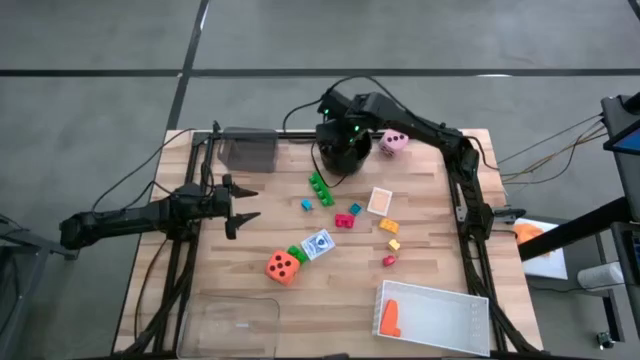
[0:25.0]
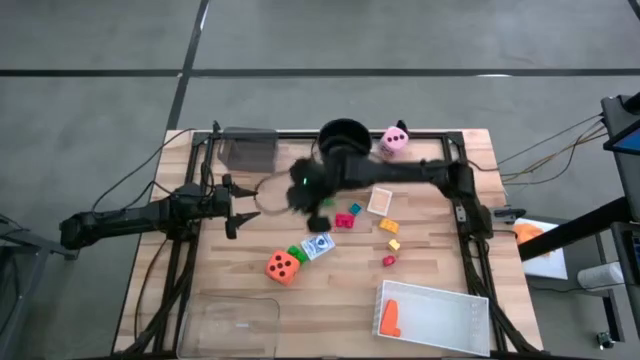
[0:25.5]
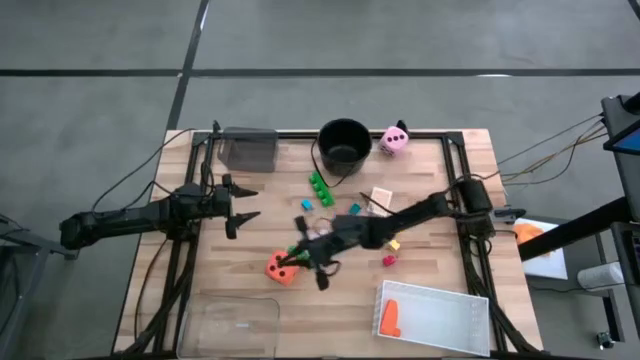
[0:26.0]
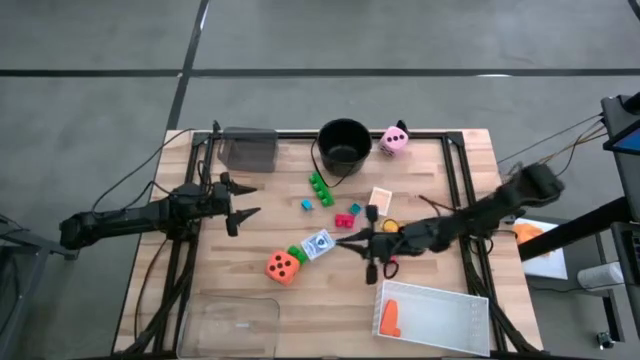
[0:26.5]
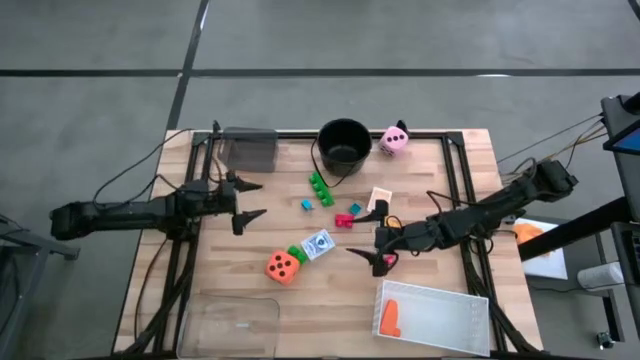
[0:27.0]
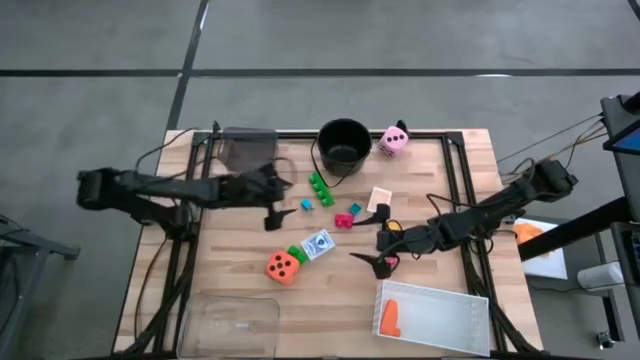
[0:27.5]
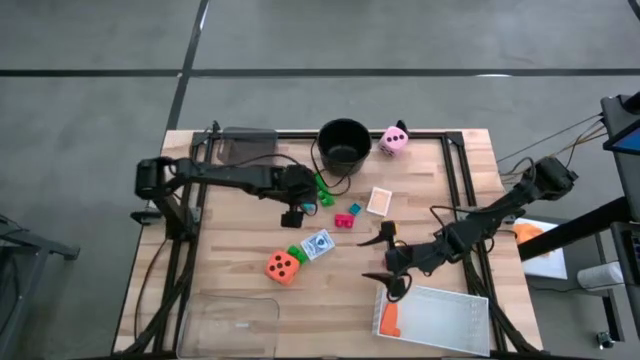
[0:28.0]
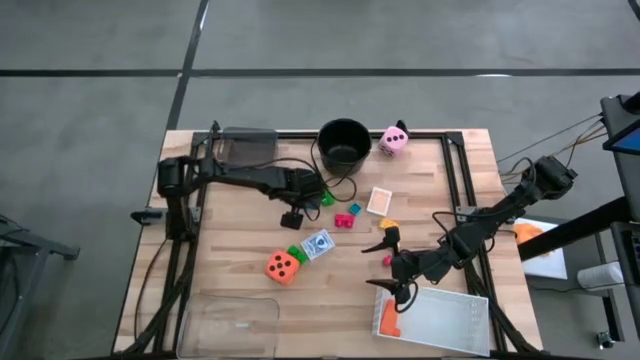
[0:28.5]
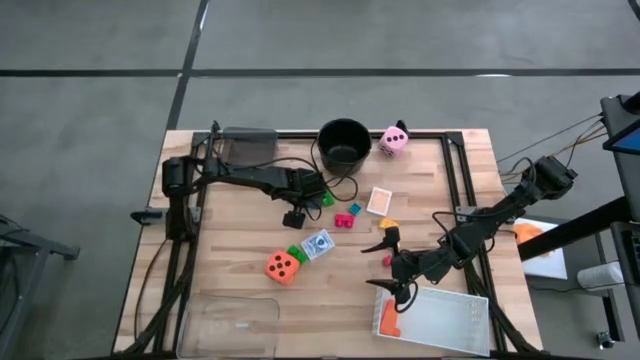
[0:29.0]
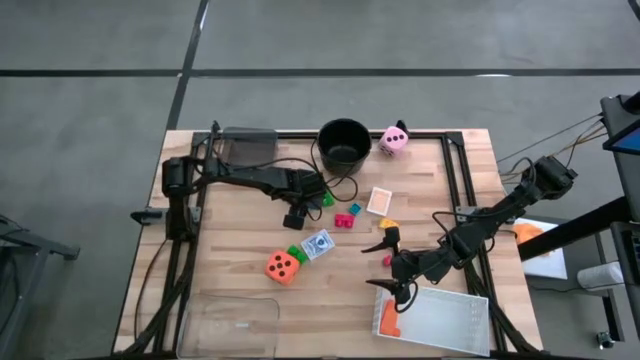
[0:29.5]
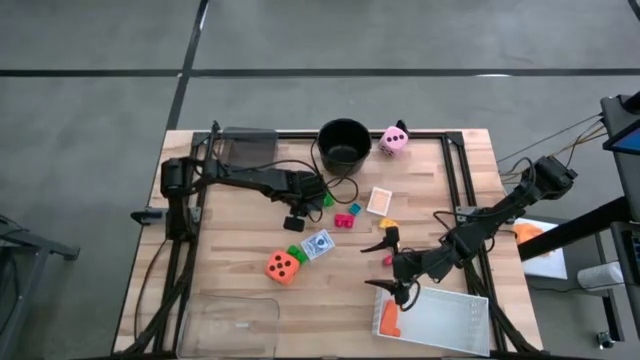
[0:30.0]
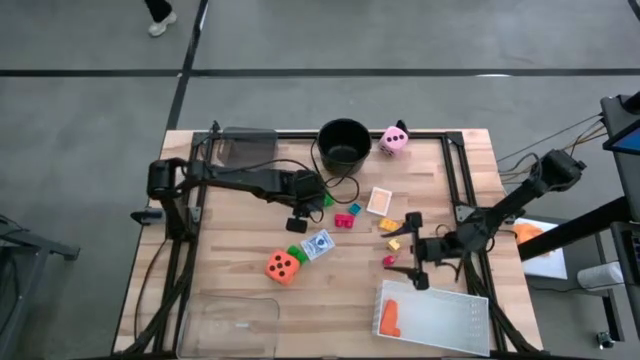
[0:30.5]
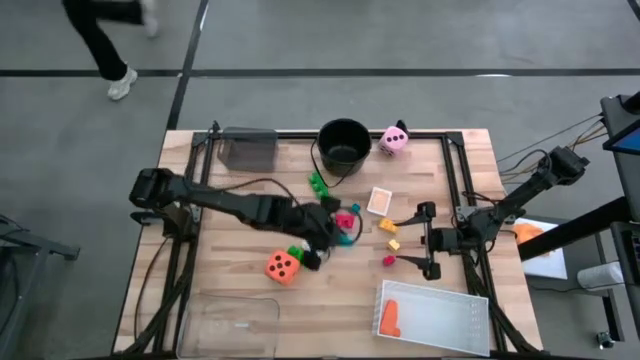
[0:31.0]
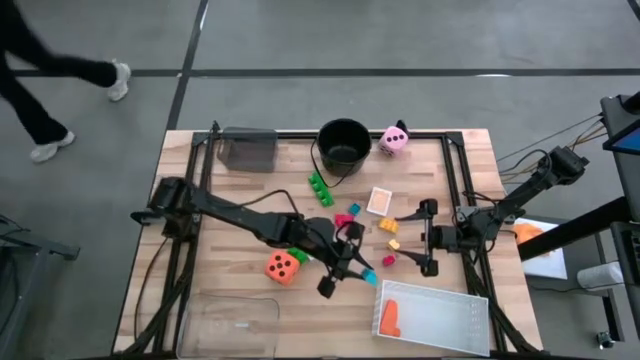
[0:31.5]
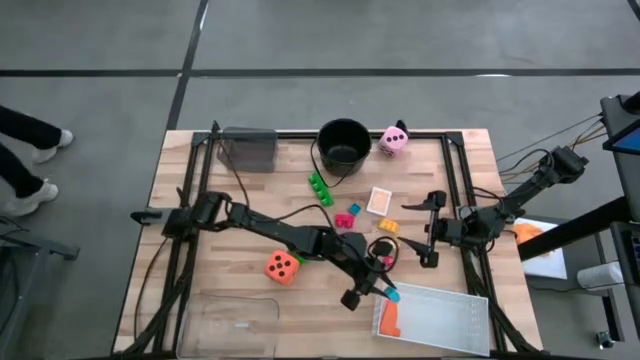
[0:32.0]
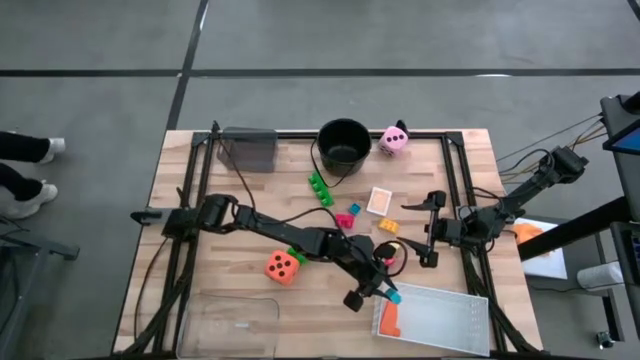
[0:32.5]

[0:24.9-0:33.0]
Task: Pick & Place Toys
Put the left blue game piece into the white bin

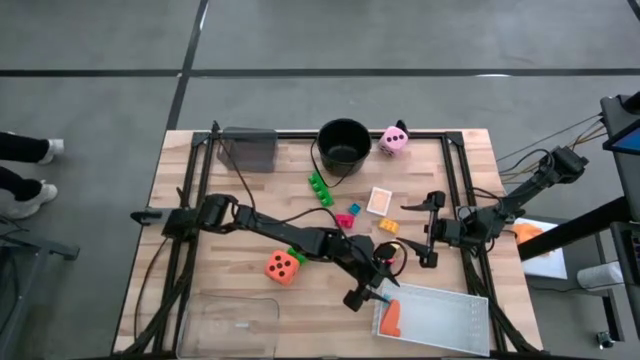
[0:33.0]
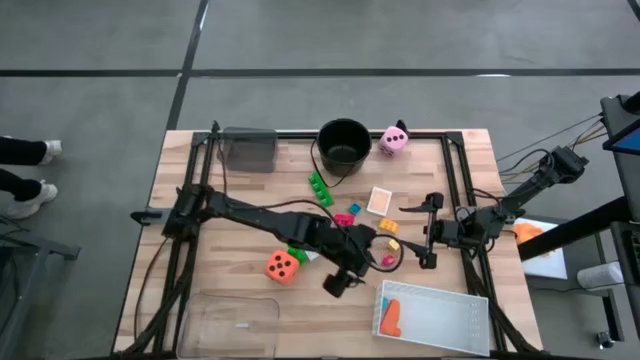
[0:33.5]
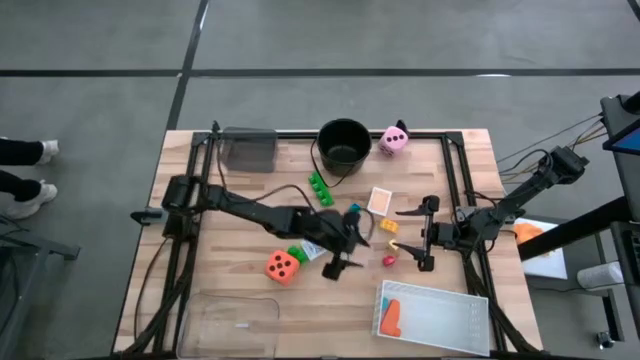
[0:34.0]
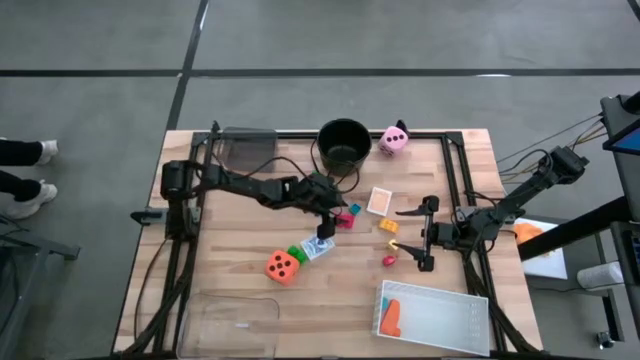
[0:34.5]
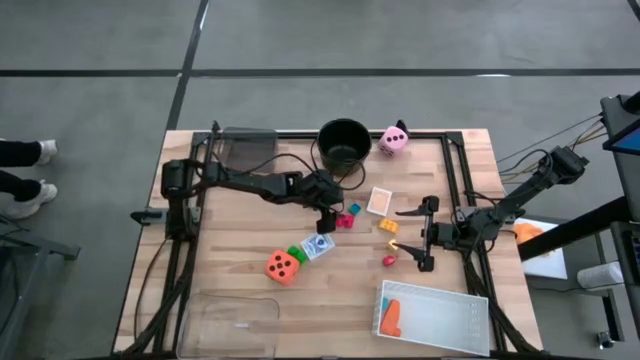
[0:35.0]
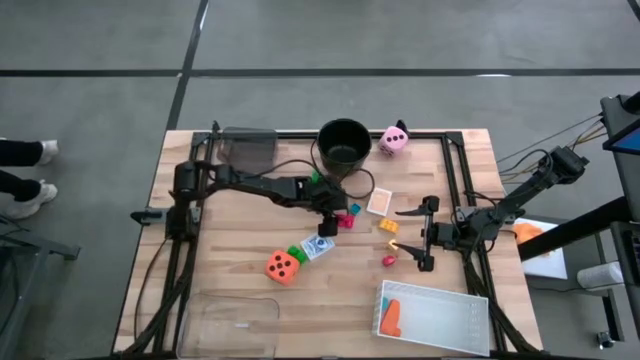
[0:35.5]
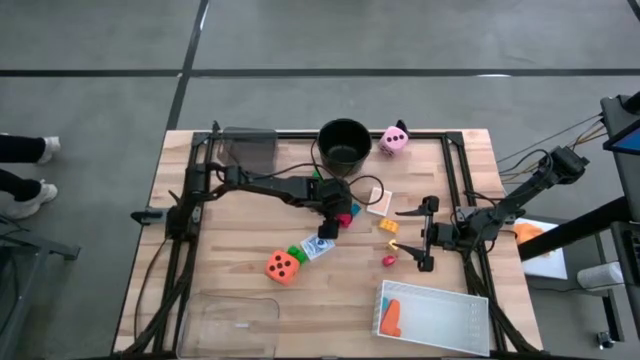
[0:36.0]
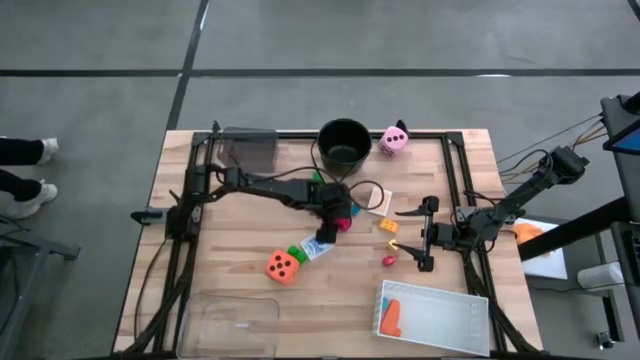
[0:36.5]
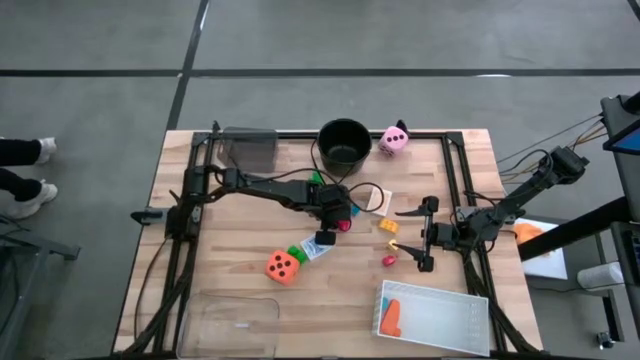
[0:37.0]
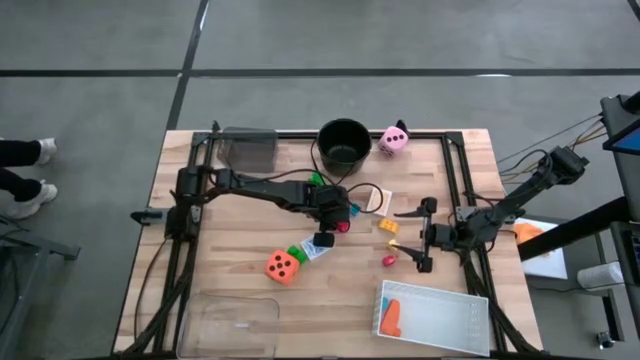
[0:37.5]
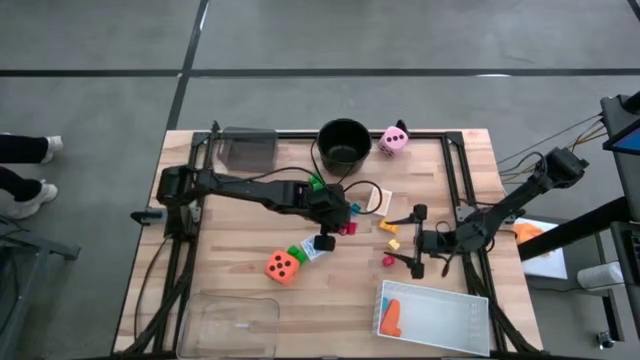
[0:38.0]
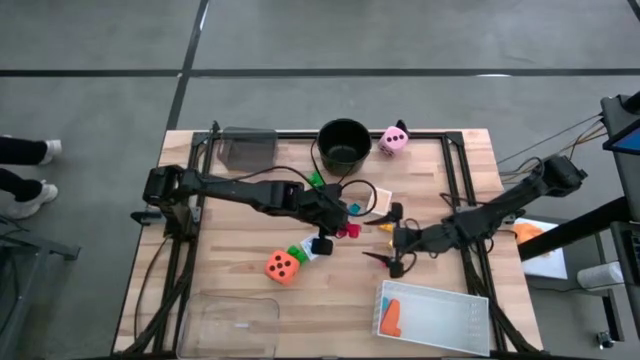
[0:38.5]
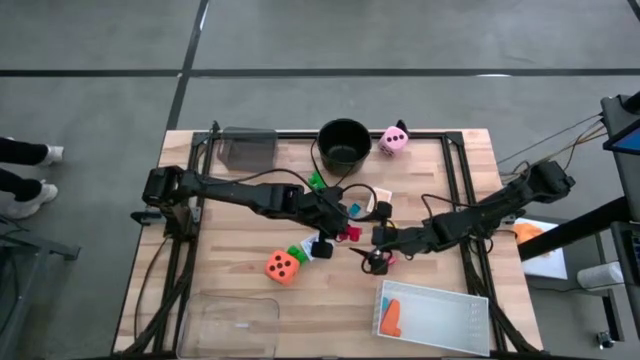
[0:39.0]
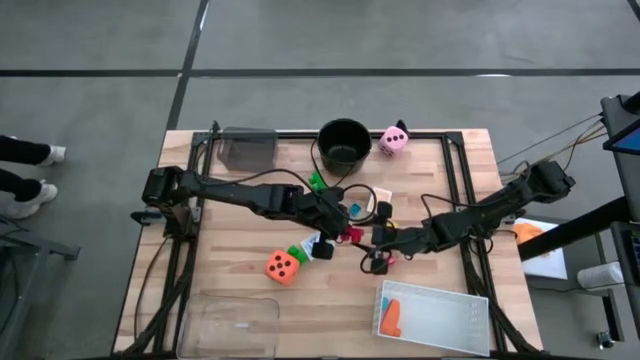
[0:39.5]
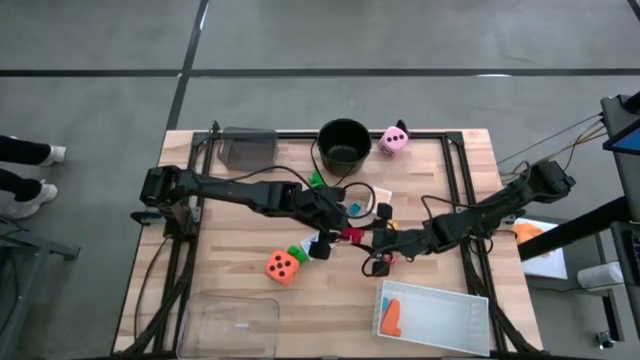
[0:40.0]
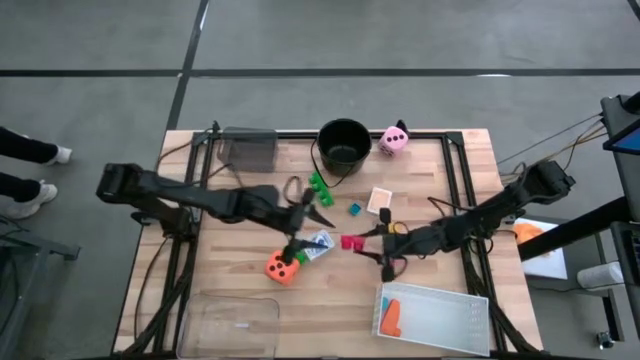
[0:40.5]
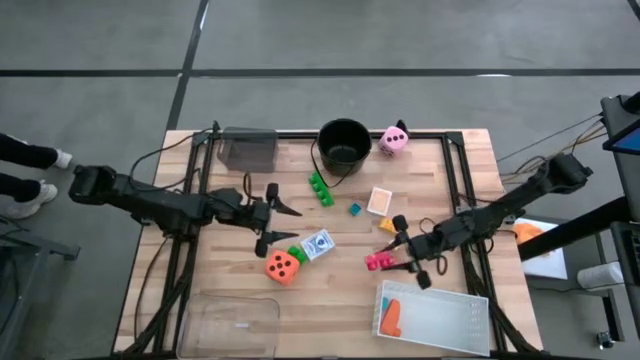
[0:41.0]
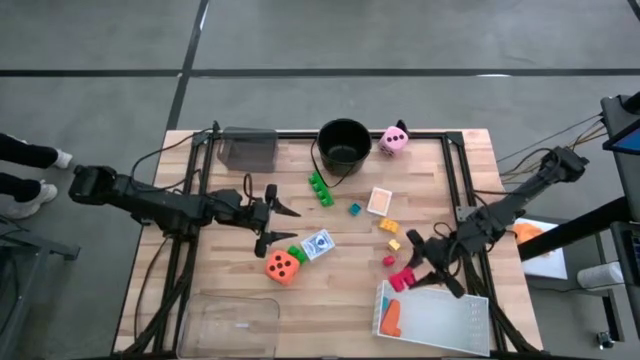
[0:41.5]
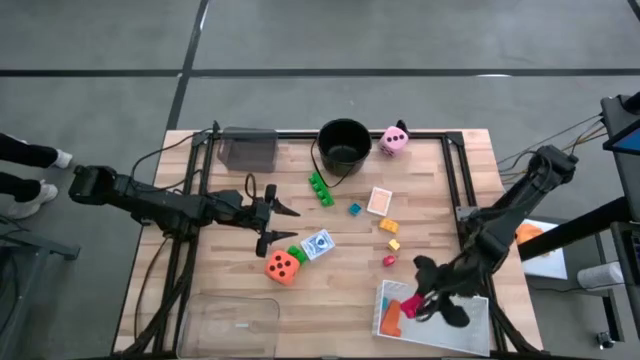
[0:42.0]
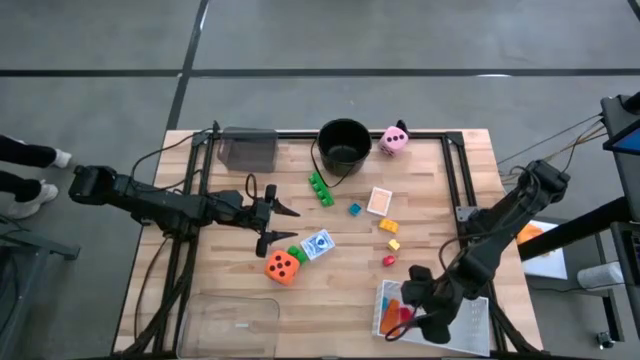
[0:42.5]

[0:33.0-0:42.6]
Put the top red game piece into the white bin

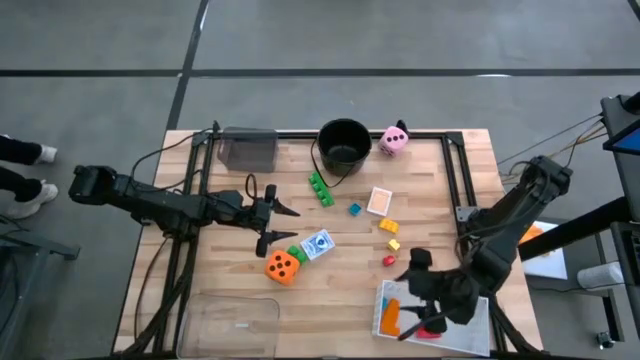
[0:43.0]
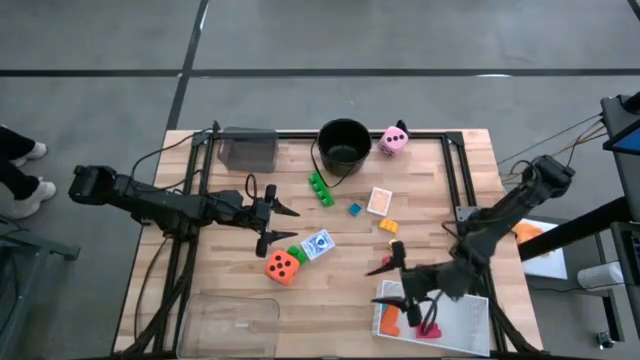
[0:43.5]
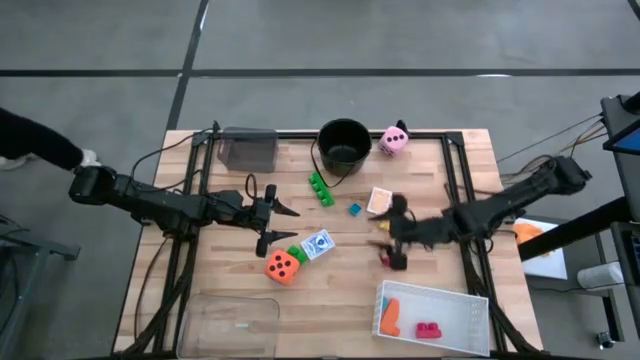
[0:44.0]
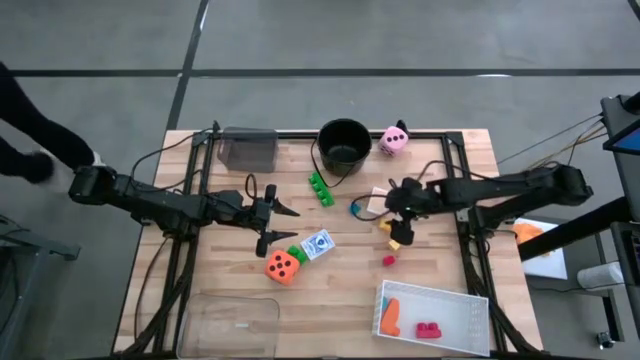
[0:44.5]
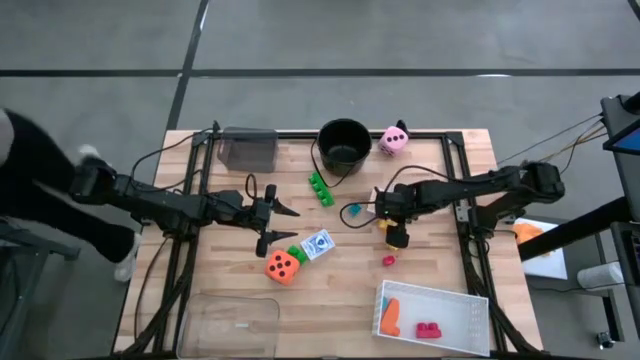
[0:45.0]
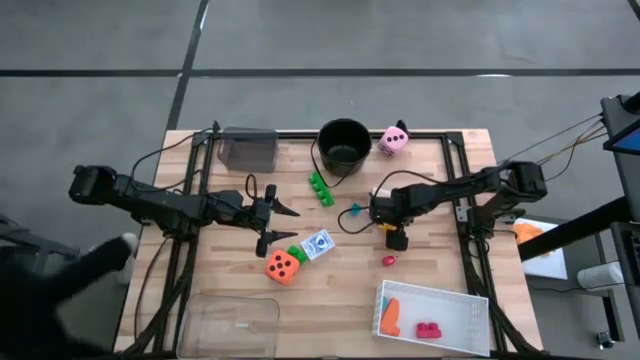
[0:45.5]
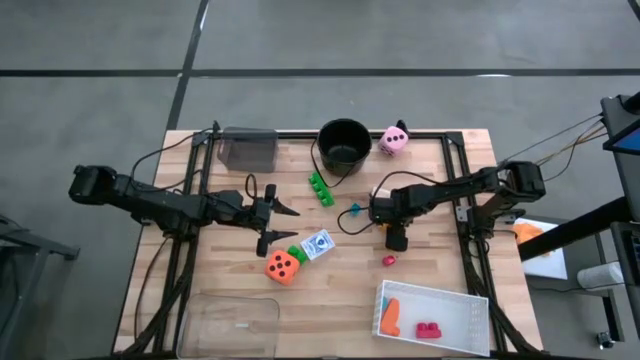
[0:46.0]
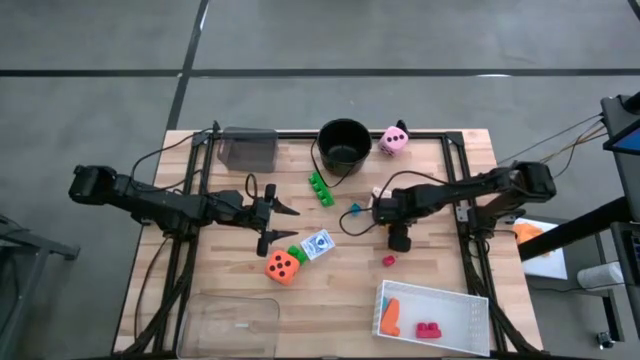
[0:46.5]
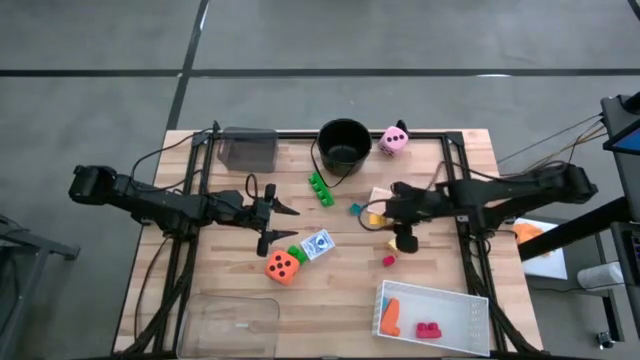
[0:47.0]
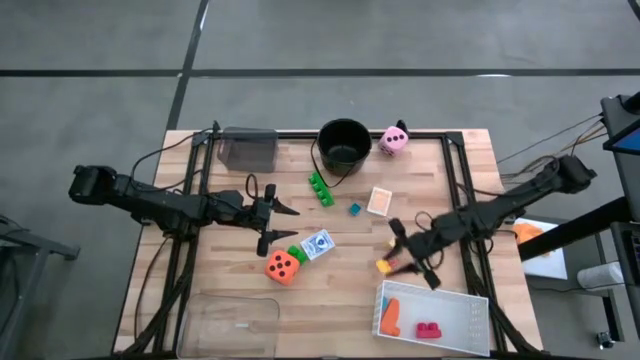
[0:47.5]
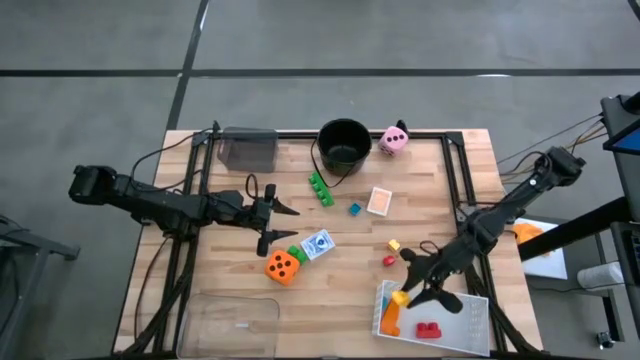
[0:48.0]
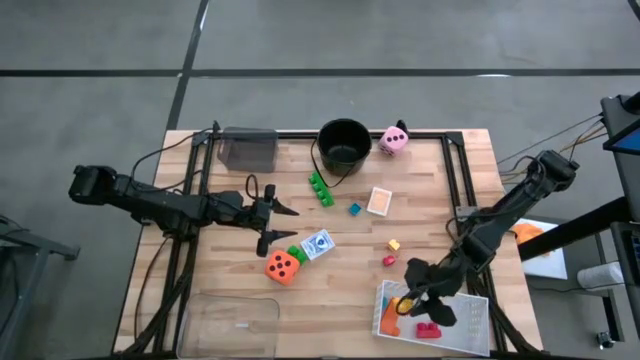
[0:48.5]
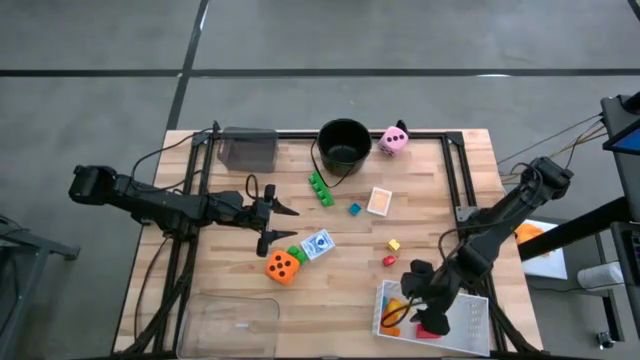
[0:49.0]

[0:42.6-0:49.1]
Put the yellow game piece into the white bin
